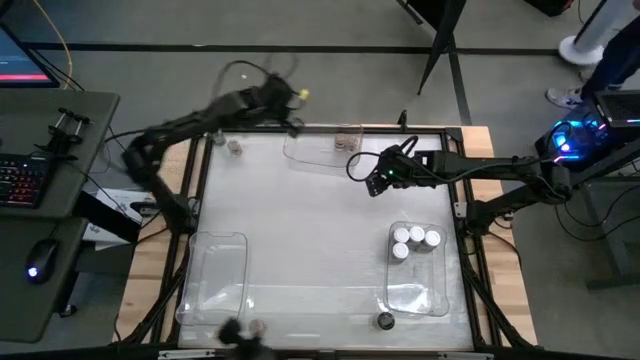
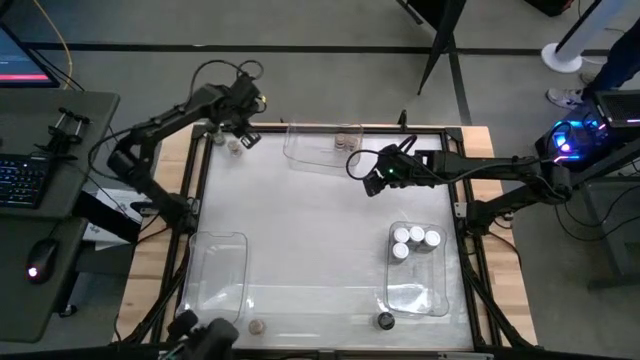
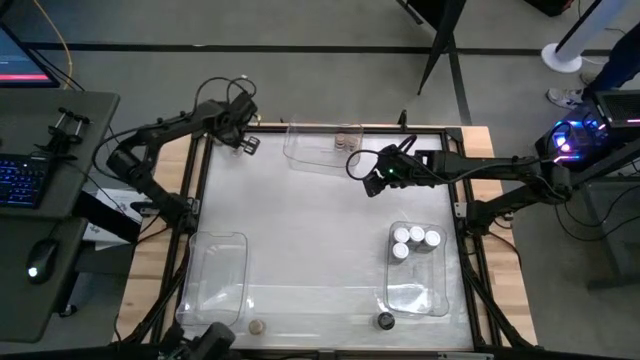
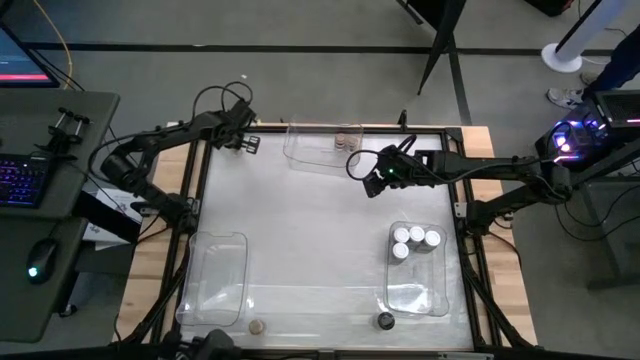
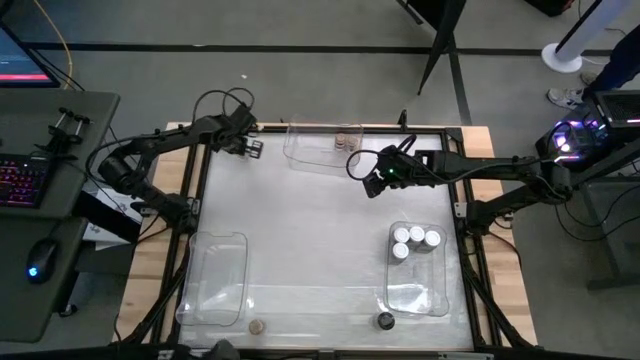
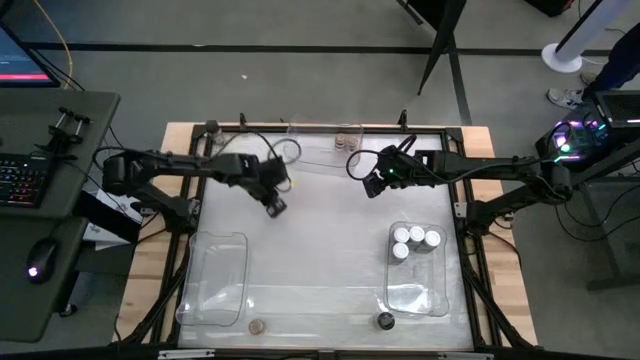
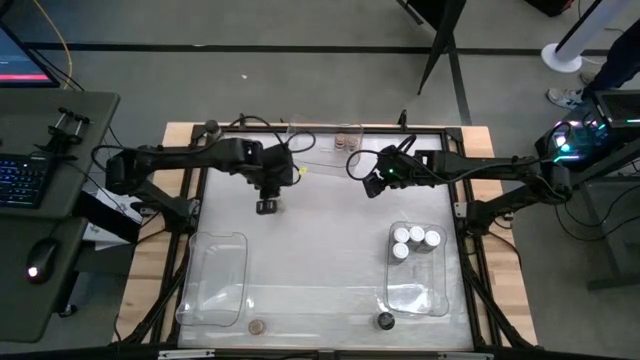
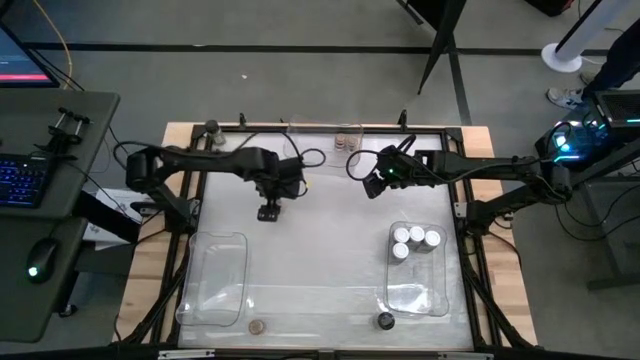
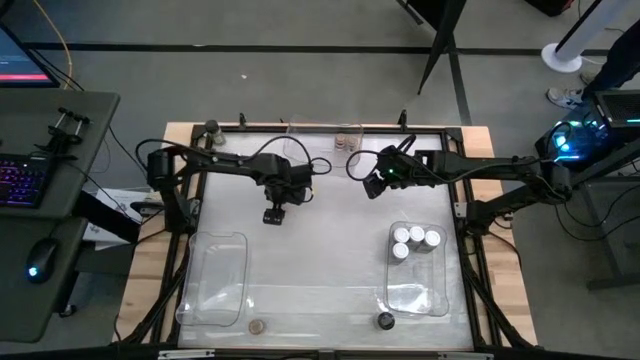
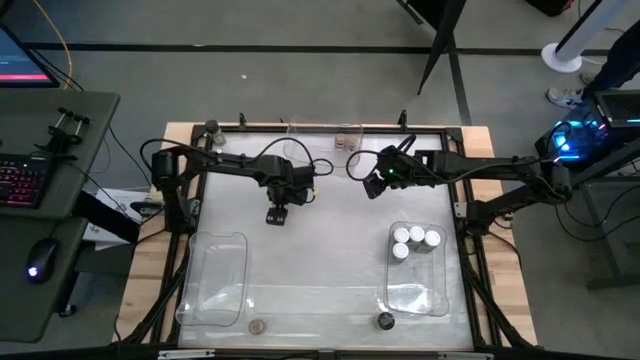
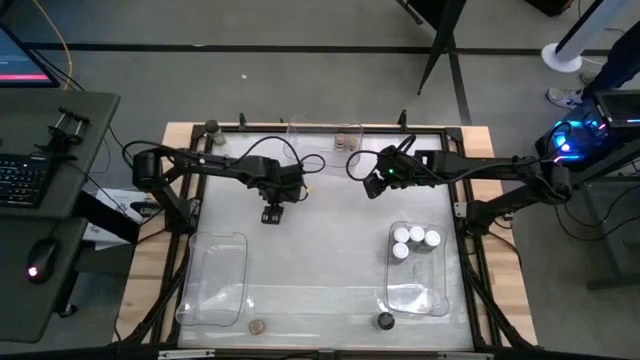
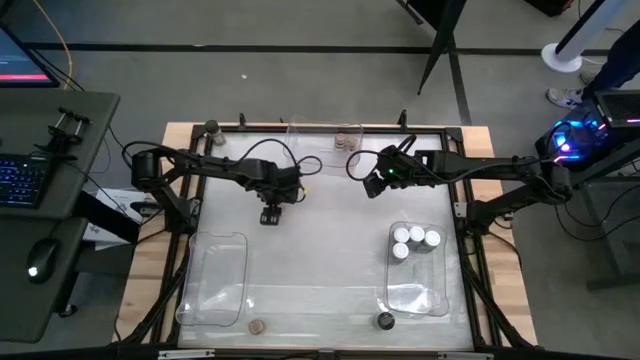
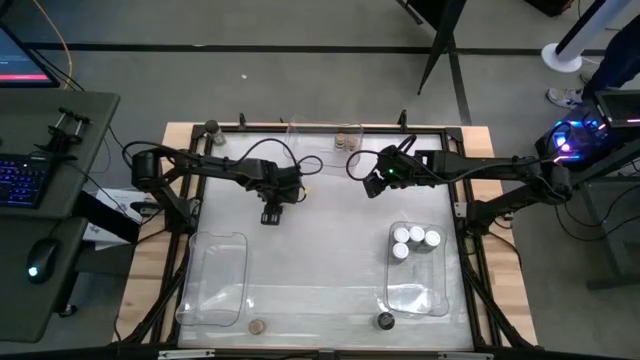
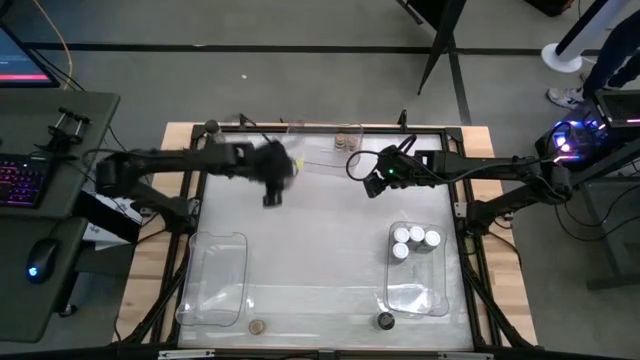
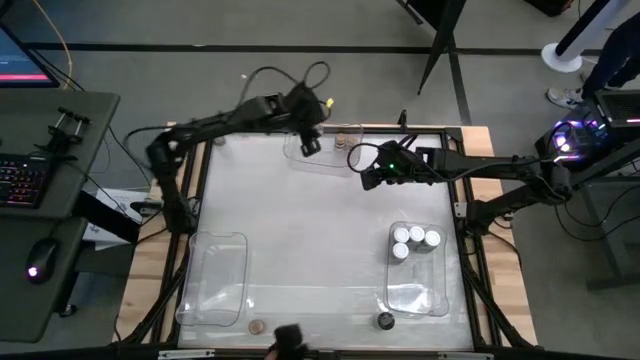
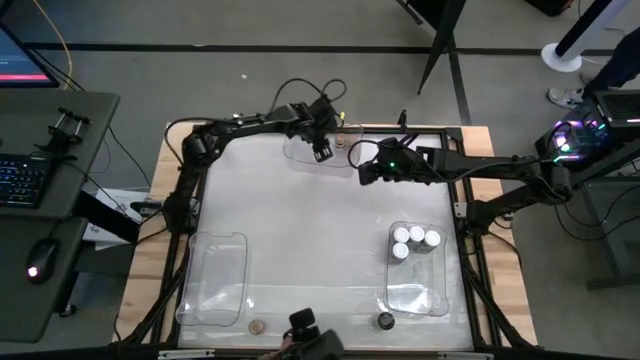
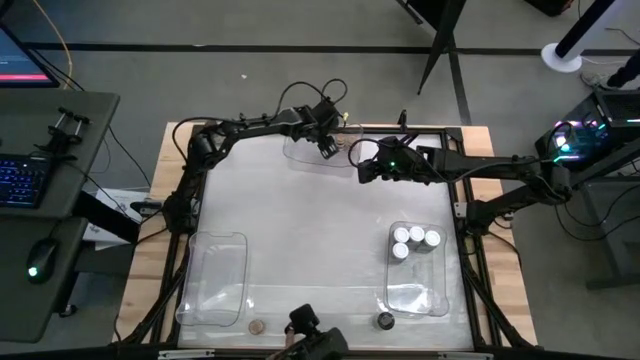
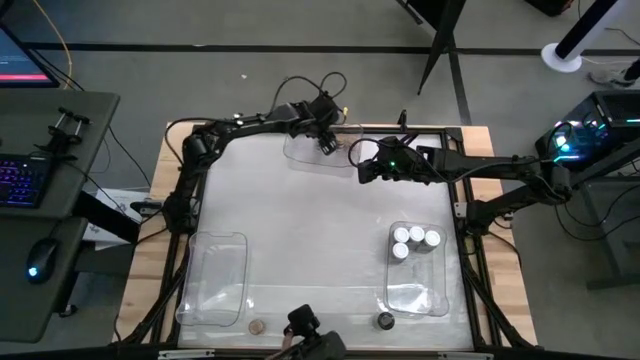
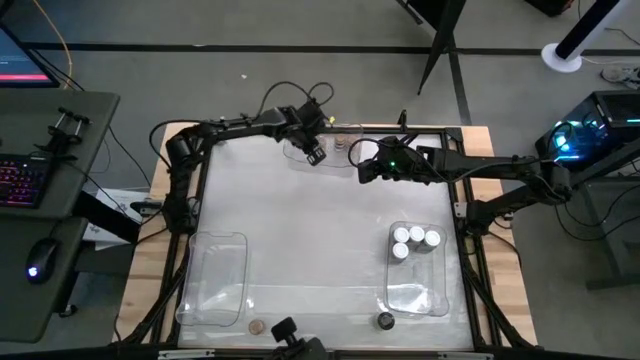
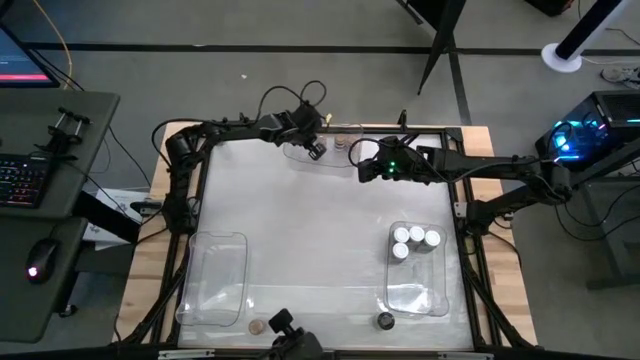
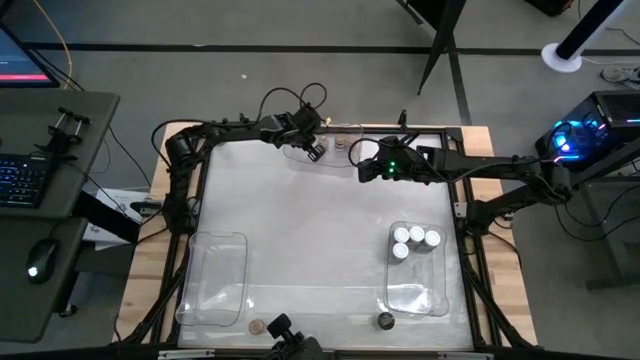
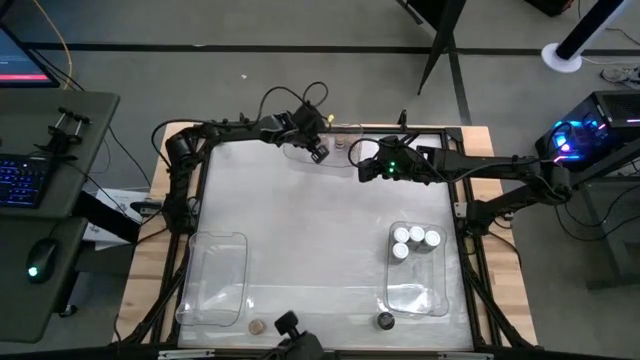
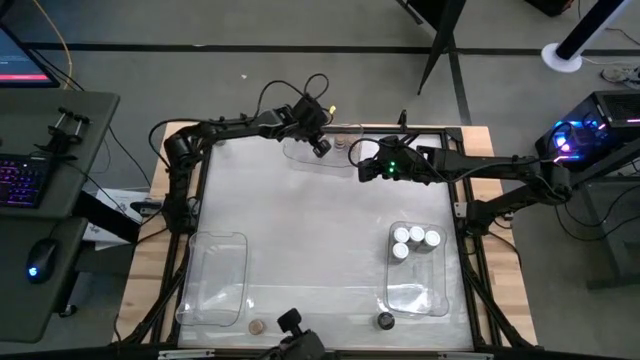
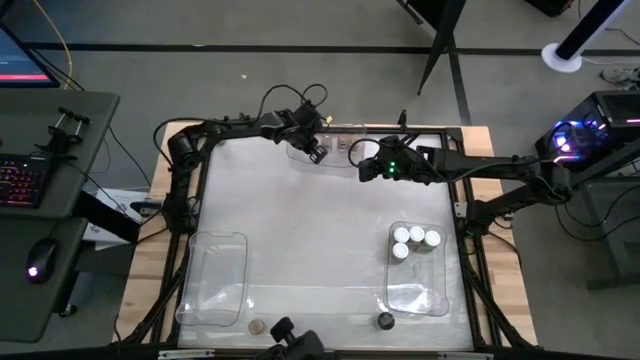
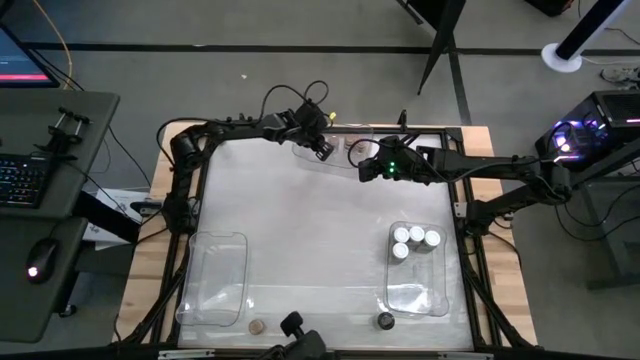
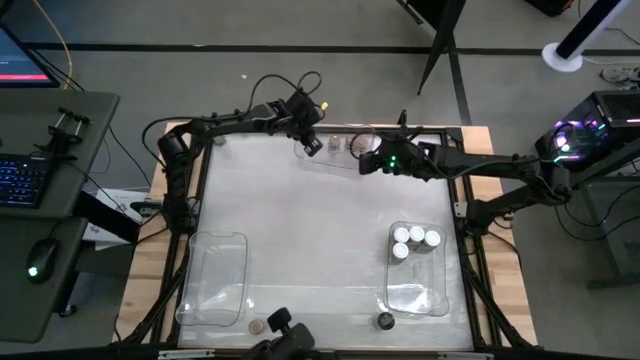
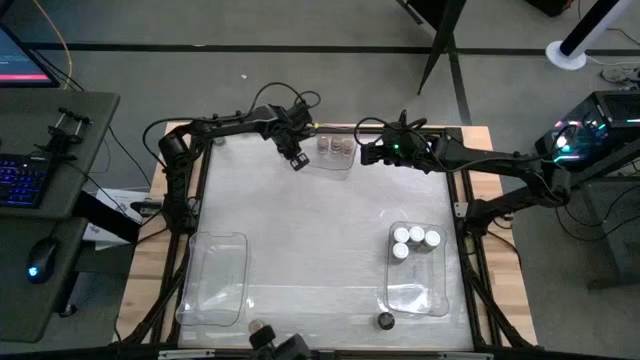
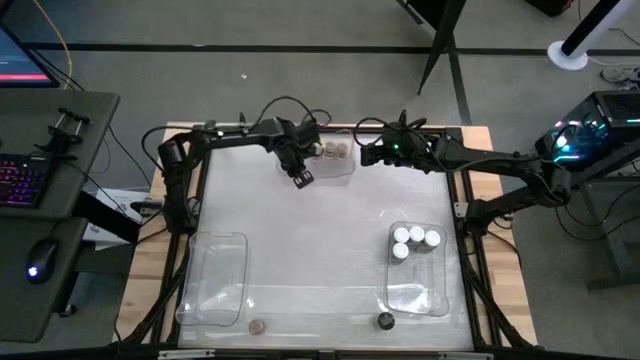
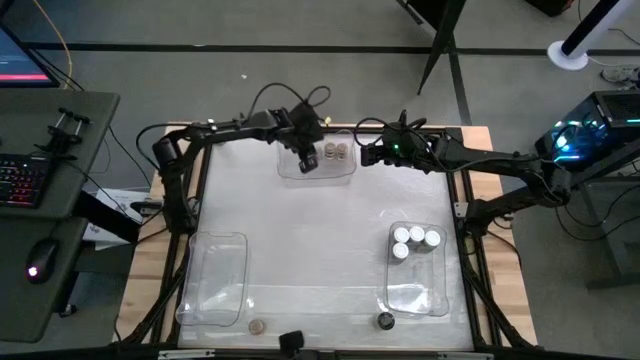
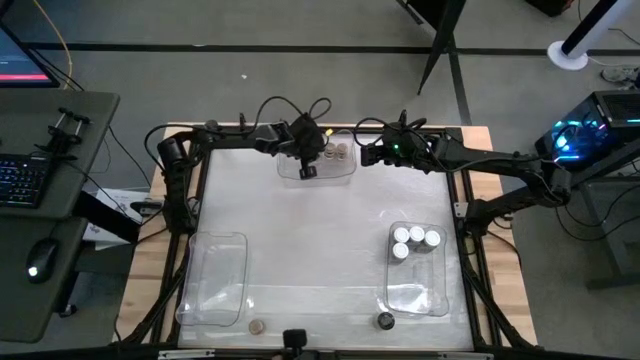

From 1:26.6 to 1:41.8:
Task: Sort spices by type
Put the brown seasoning bottle into the top transparent bin

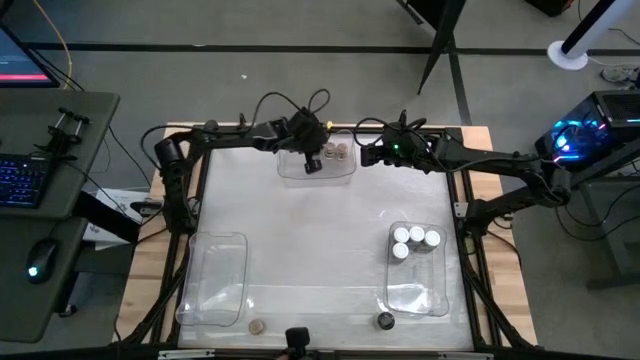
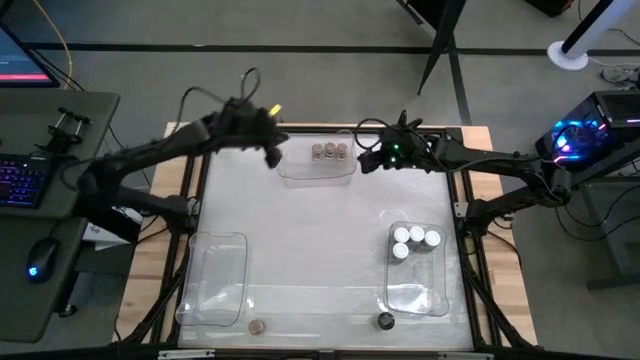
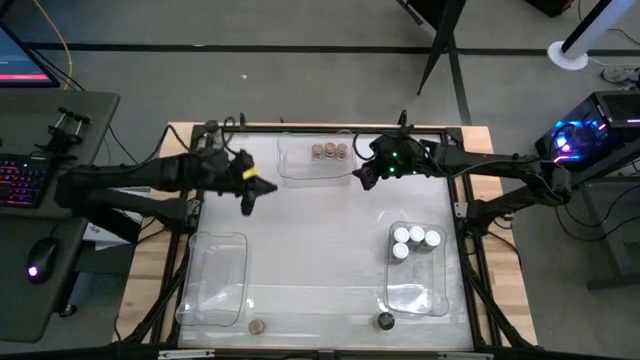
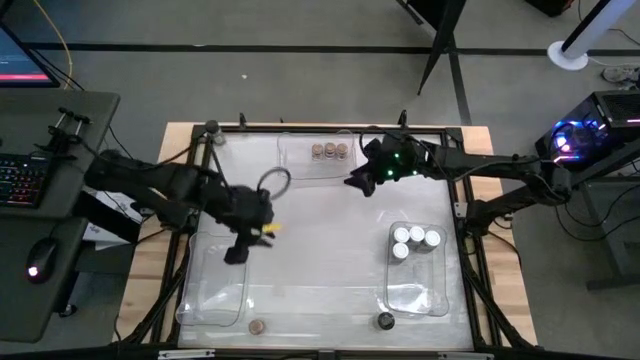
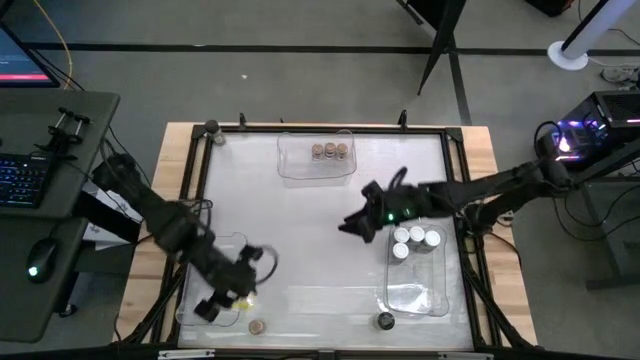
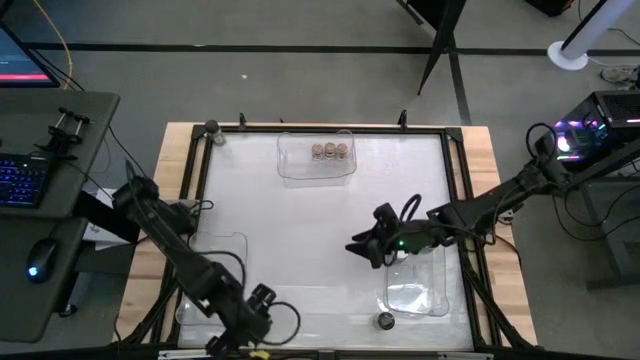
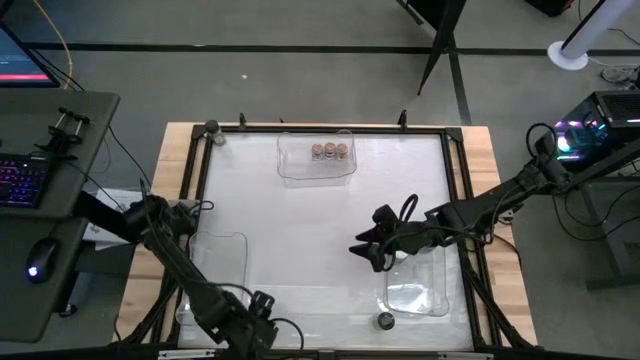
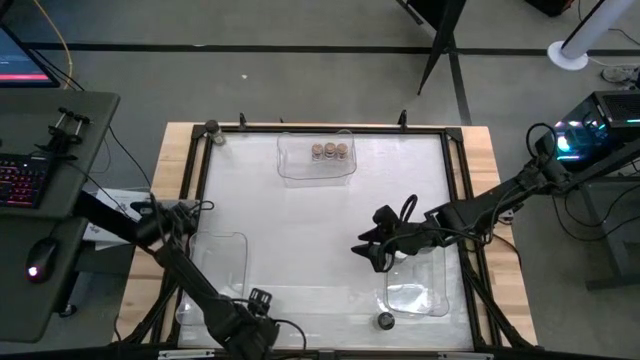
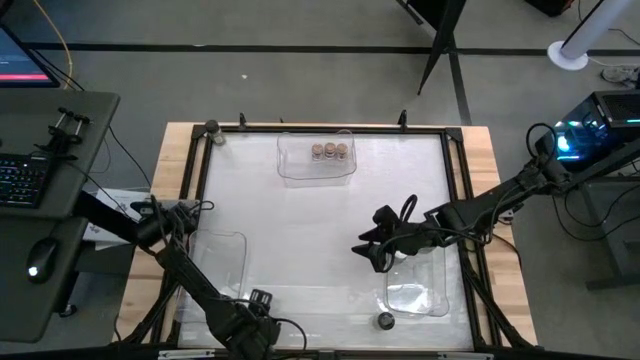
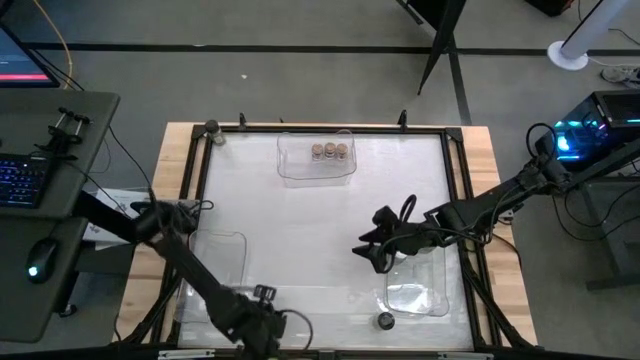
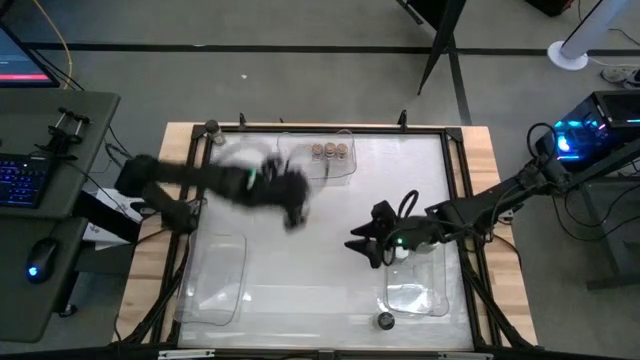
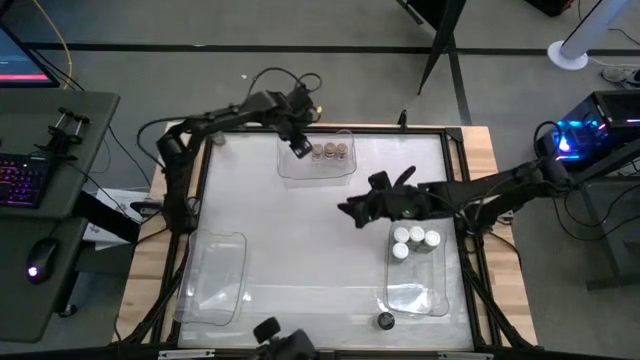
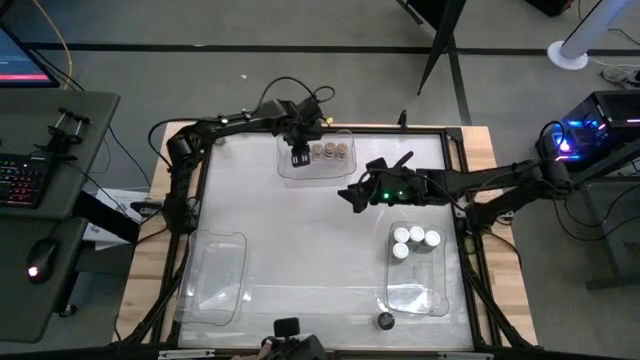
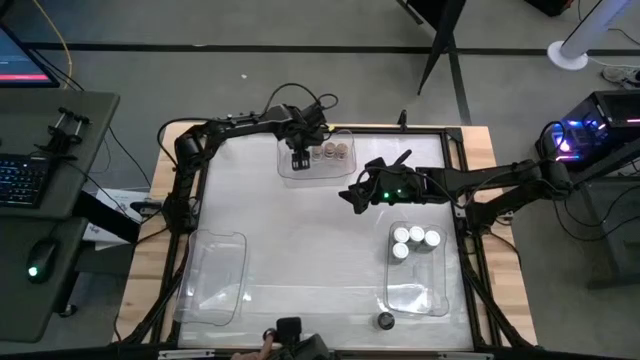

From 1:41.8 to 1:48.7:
Put the brown seasoning bottle into the top transparent bin

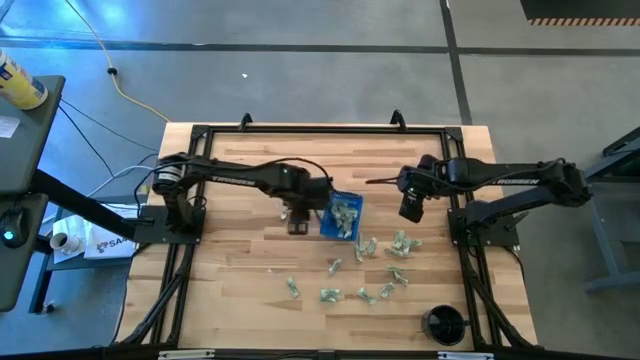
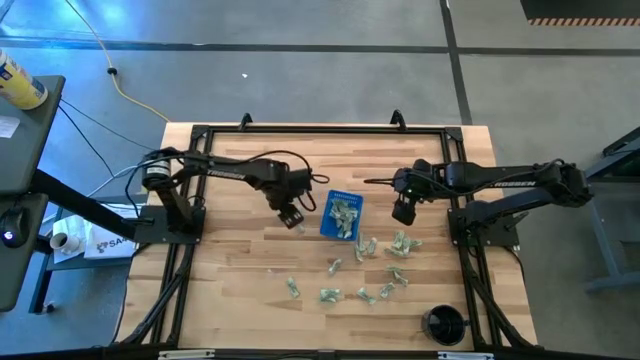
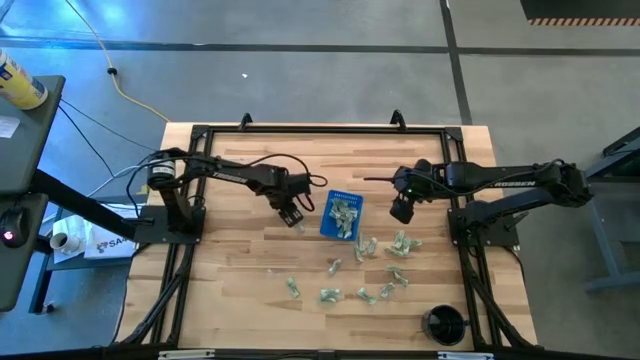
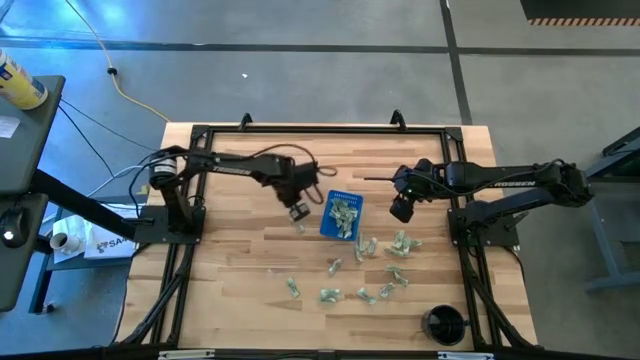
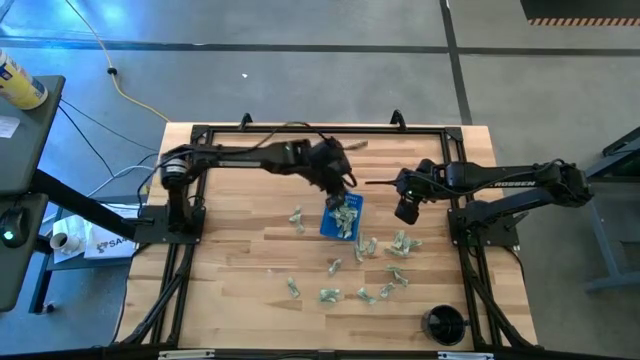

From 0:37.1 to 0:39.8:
Task: Pick and place Stevia / Truvia into bins
Put the stevia packet into the blue basket
